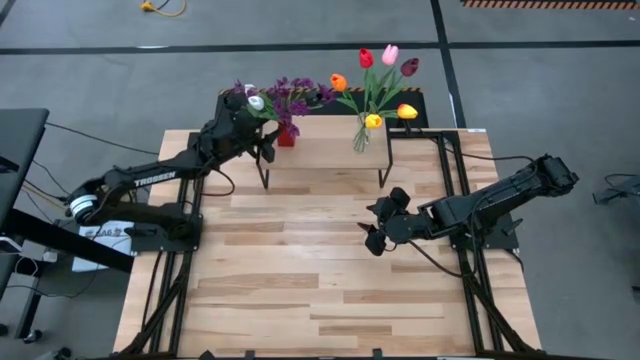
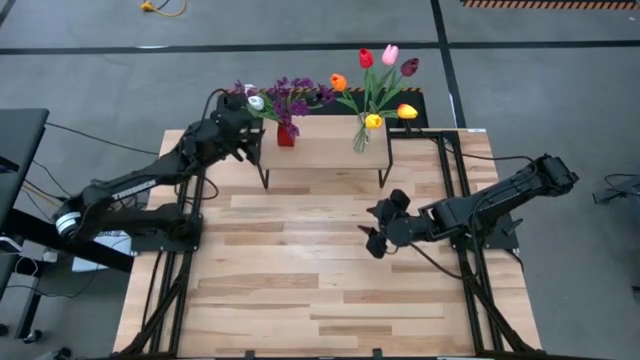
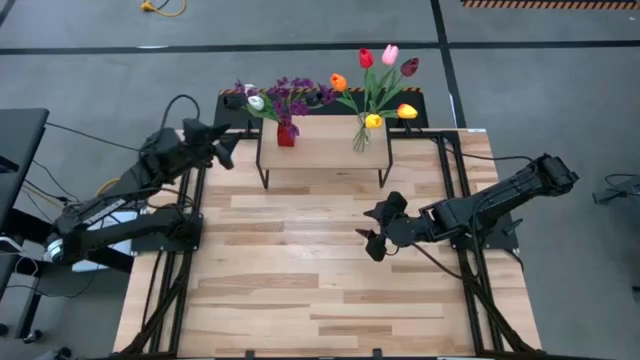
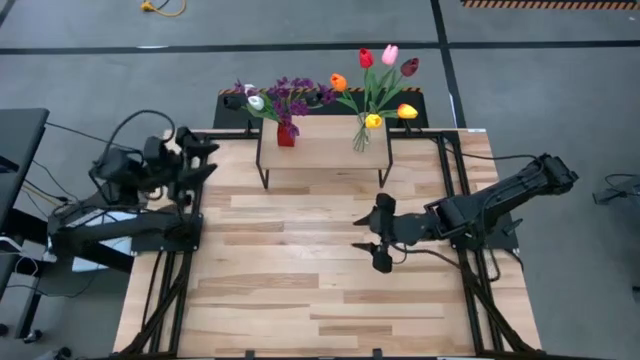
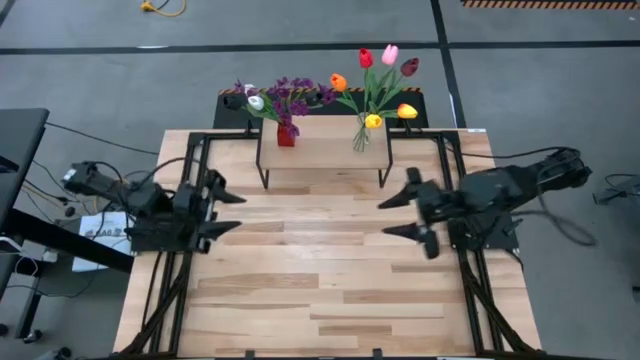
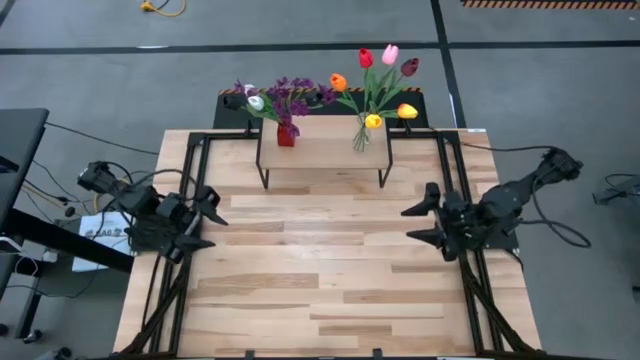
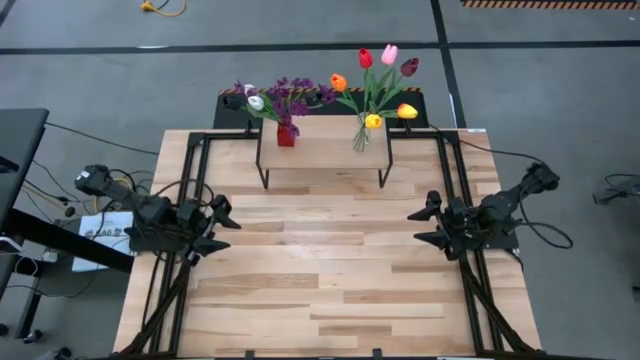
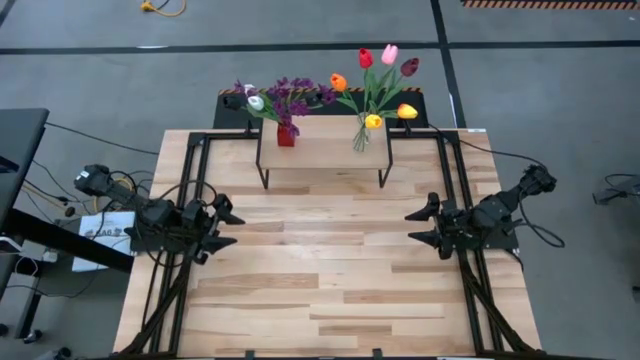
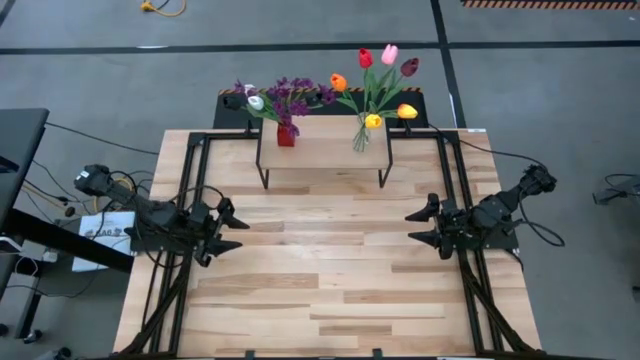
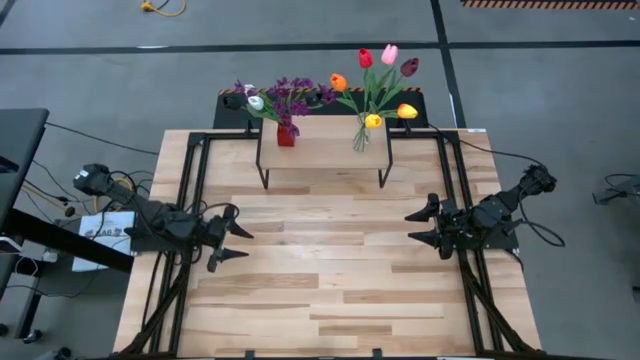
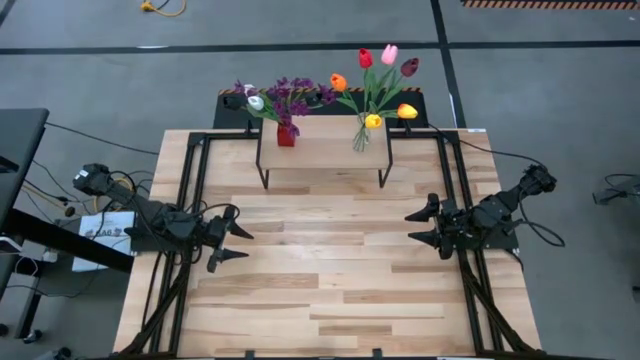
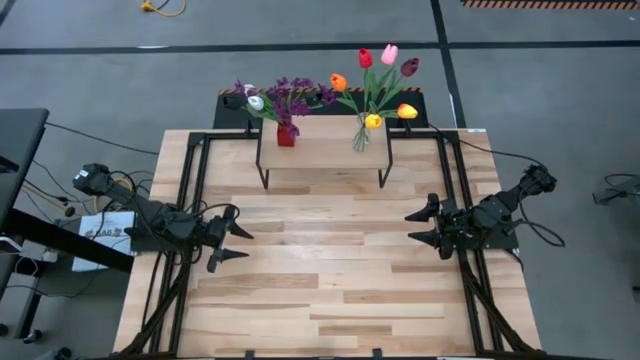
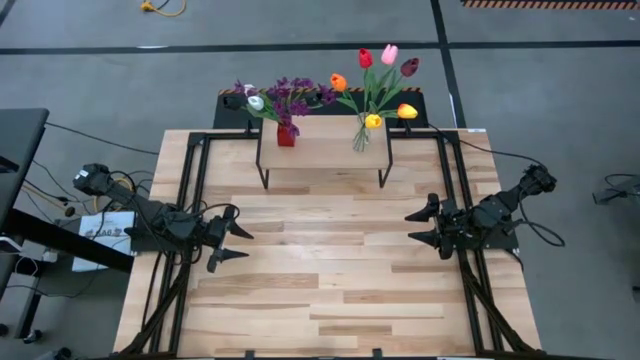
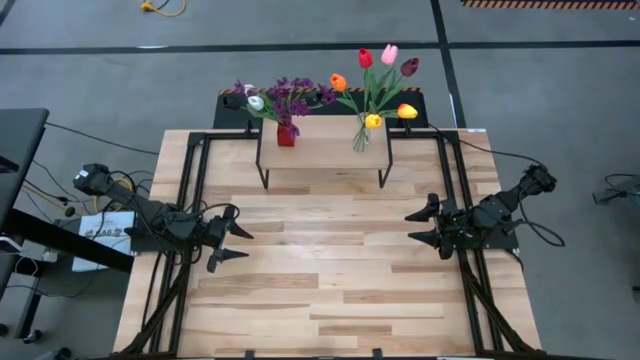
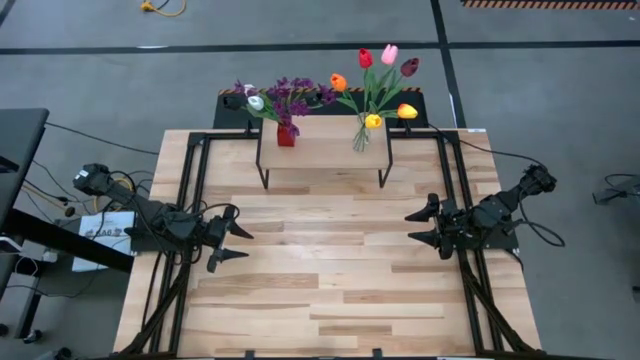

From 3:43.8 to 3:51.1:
Task: Pick and place flowers into a vace then onto a shelf
Return to Home Position

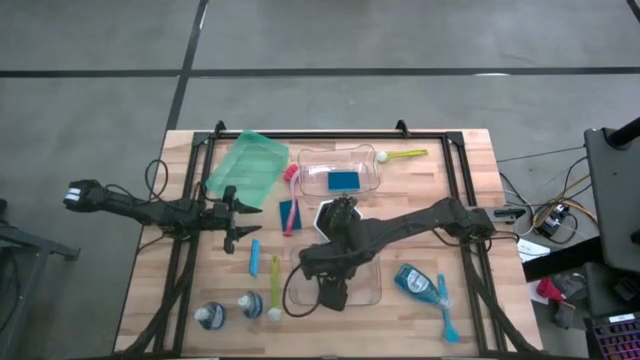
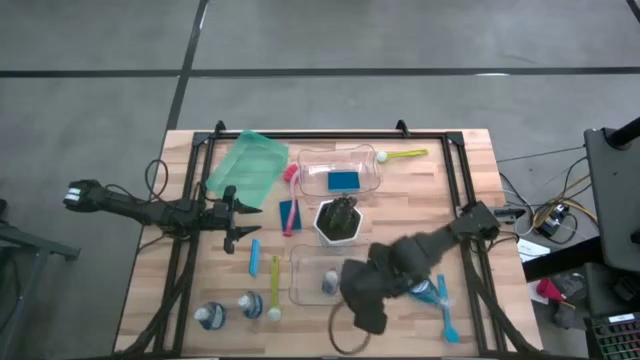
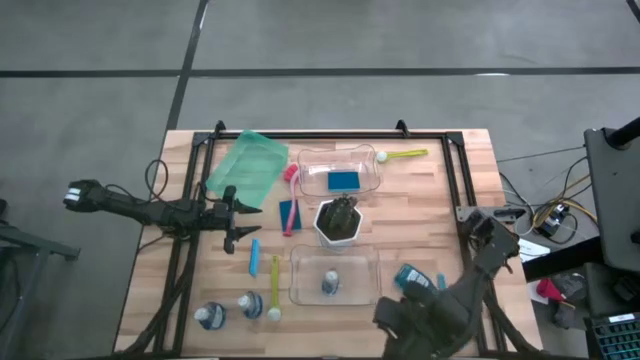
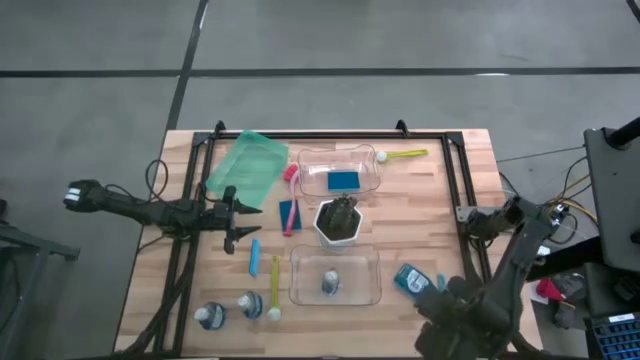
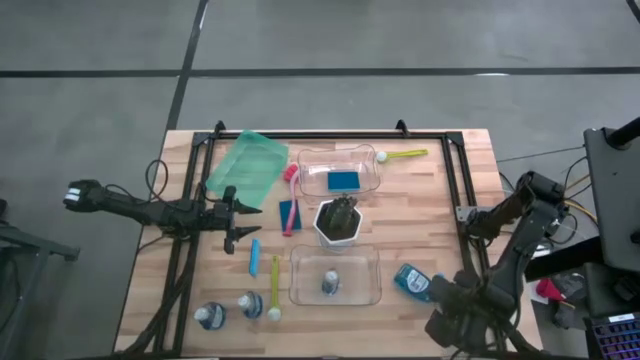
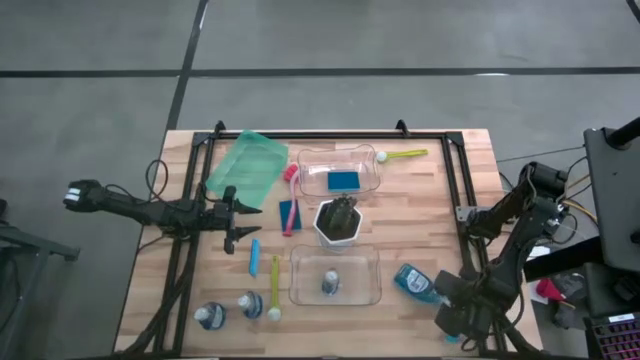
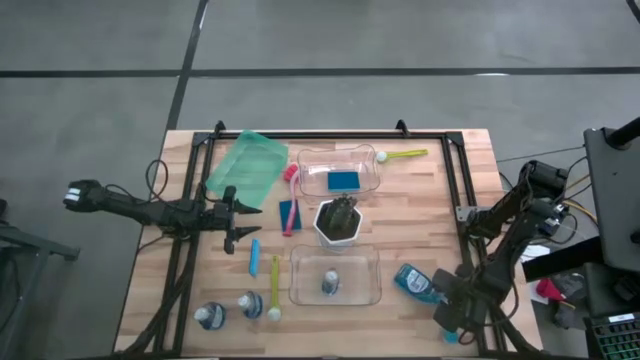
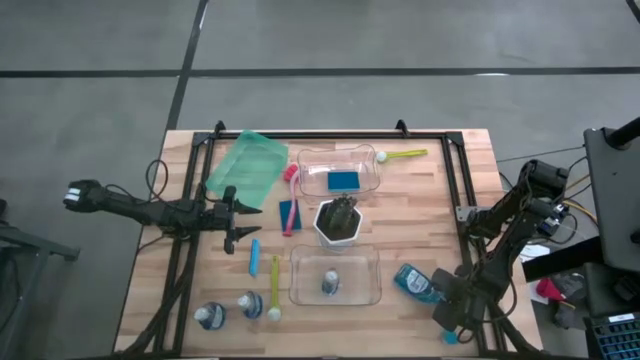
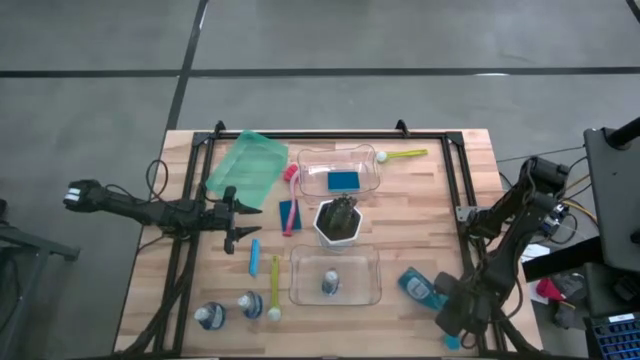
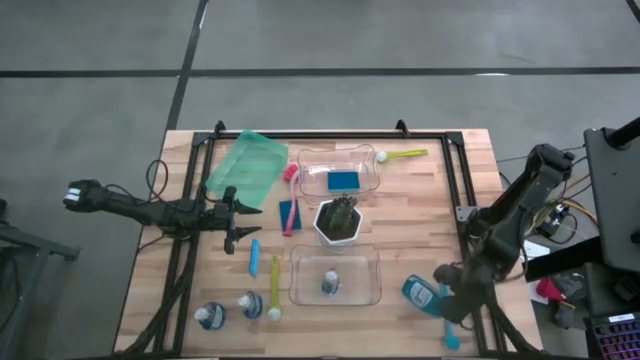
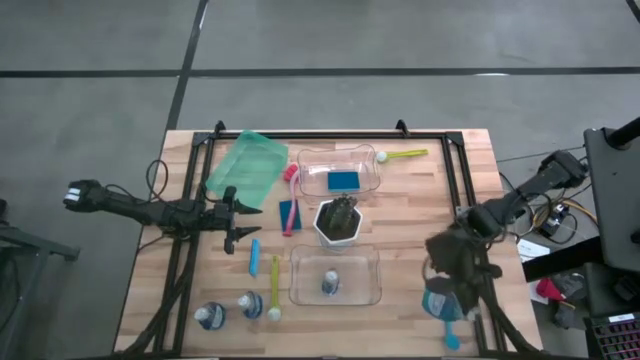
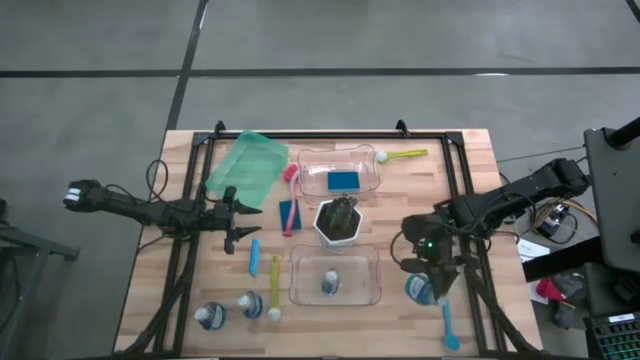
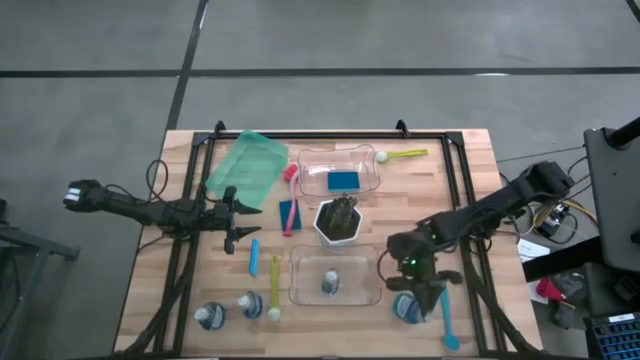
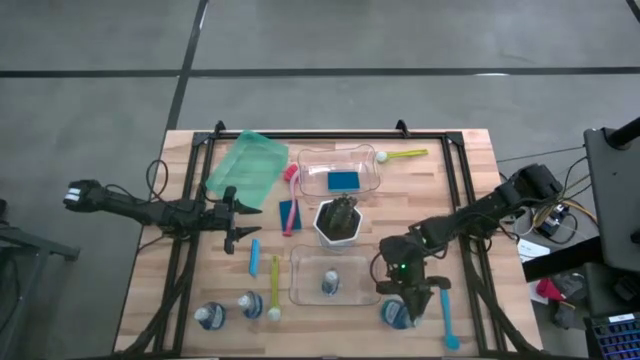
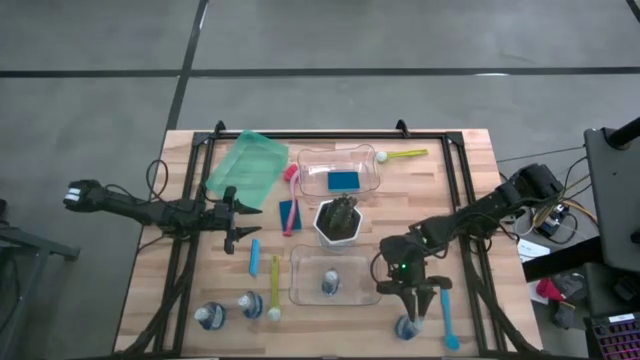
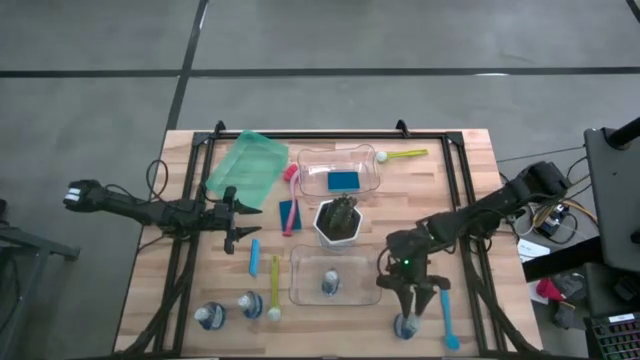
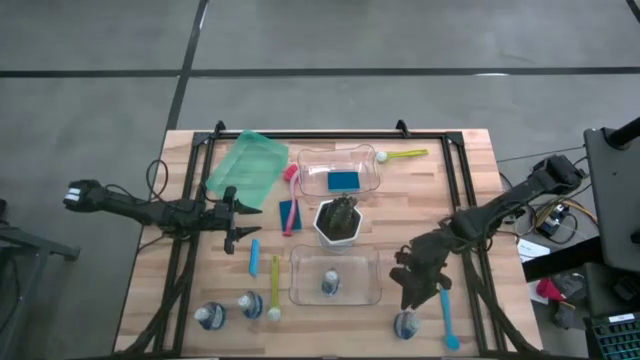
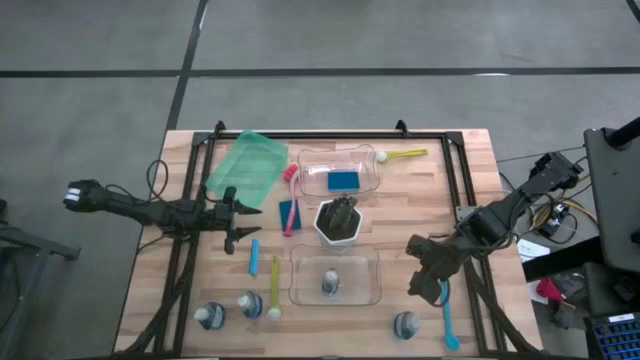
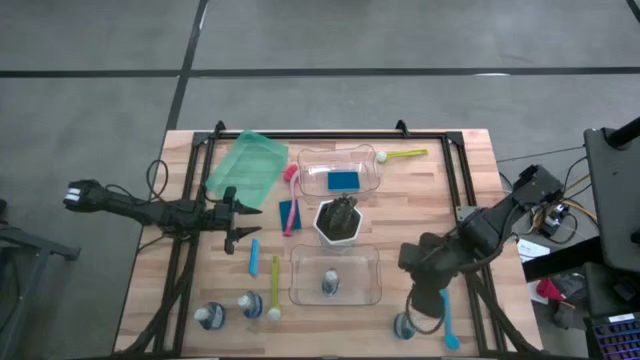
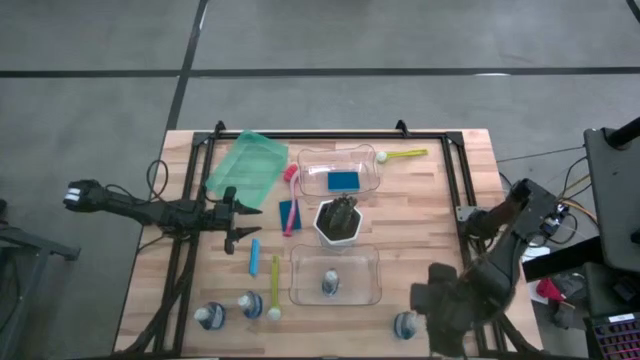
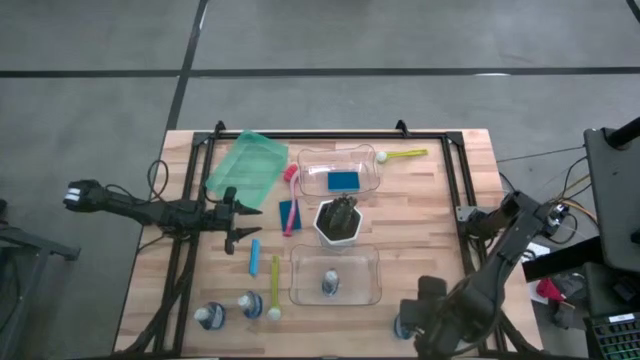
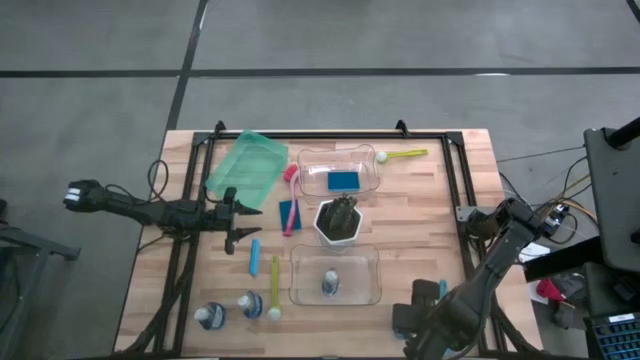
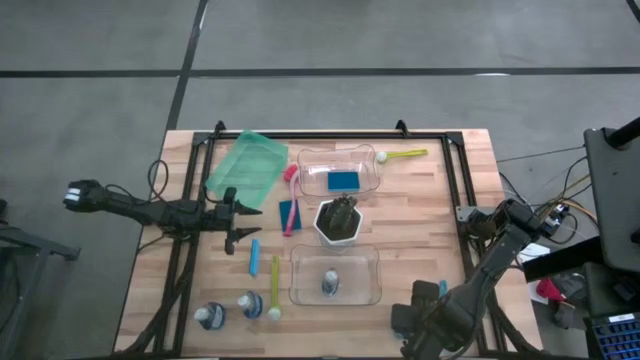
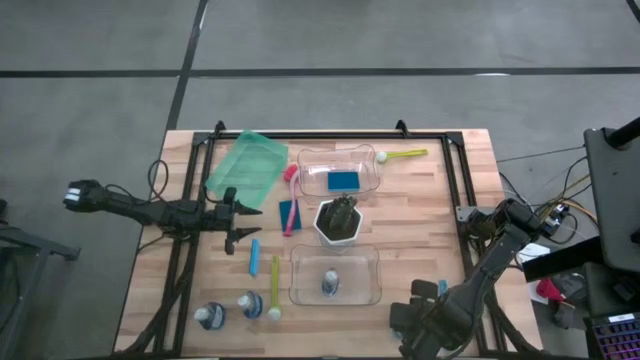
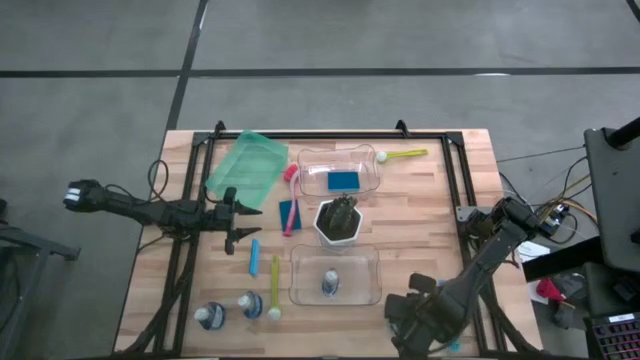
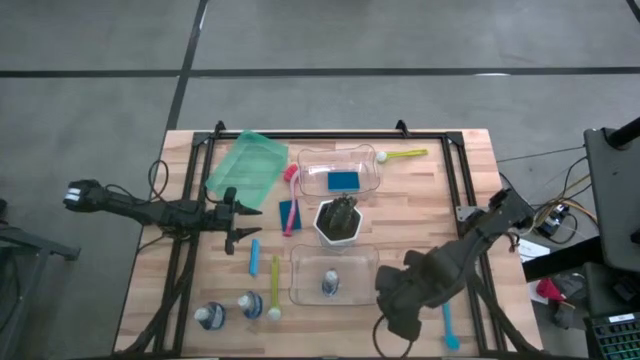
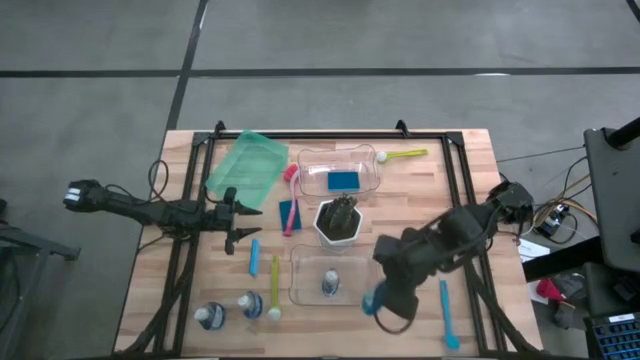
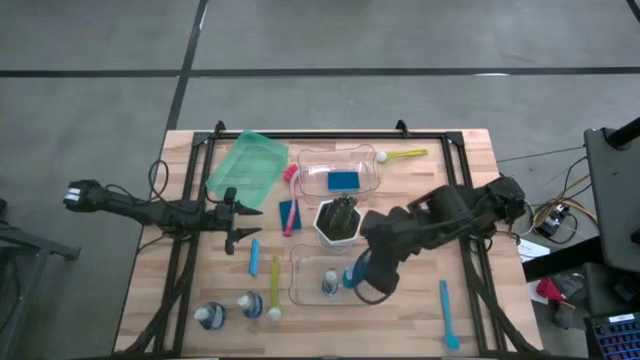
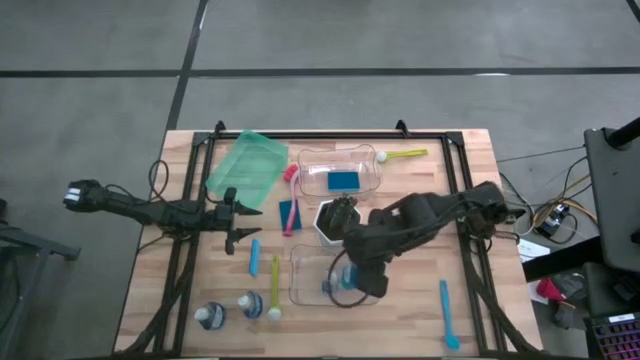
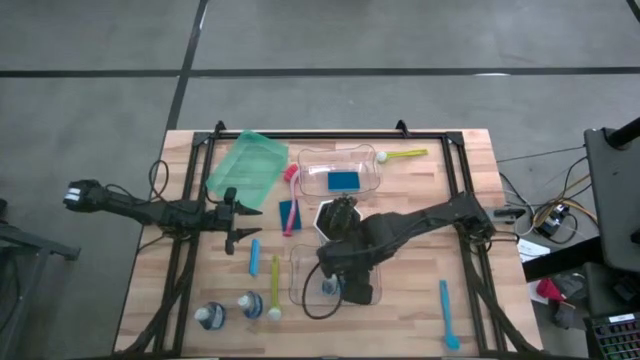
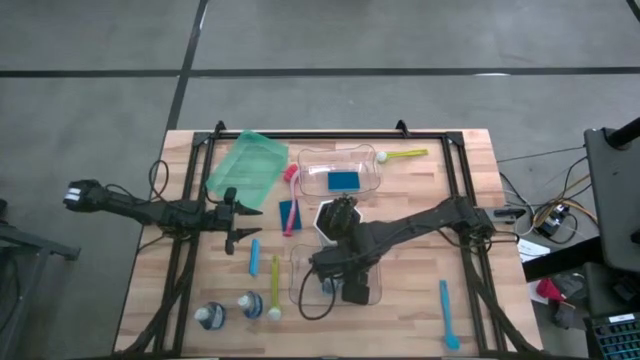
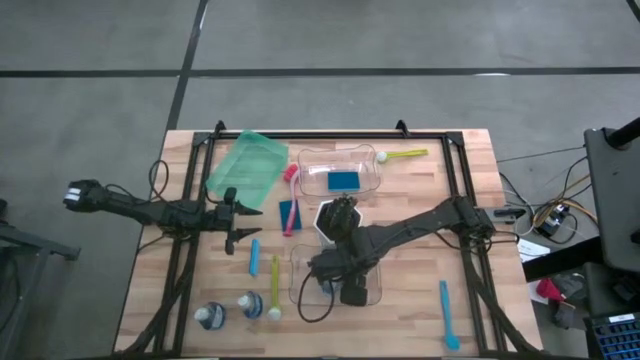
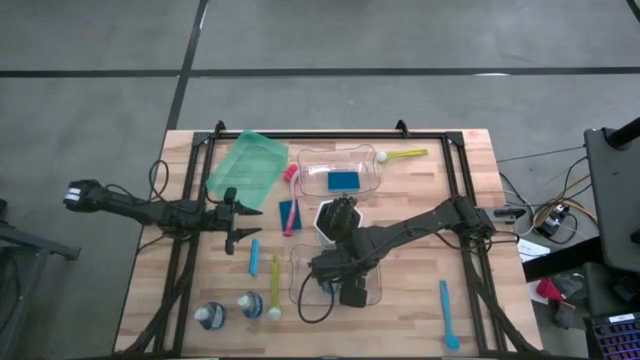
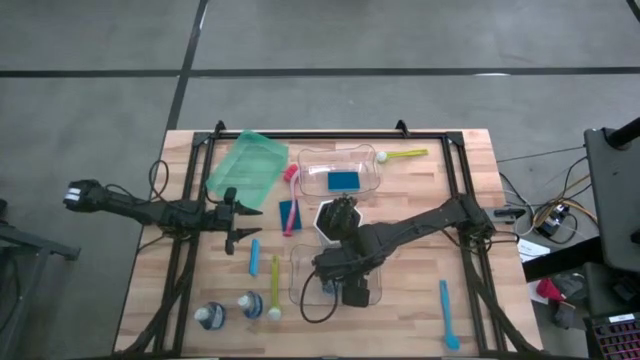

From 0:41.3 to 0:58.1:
Task: Pick & Place Kitchen Sink Supplies
Put the blue dishwashing liquid bottle into the bottom transparent bin
